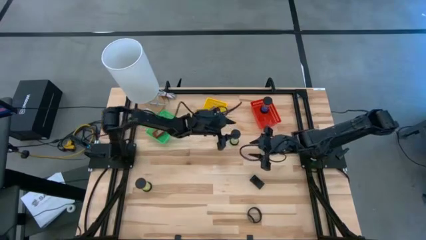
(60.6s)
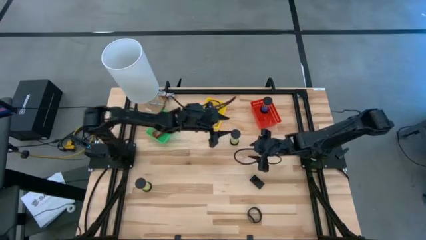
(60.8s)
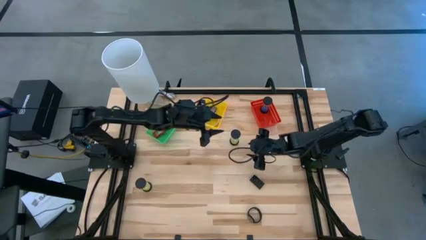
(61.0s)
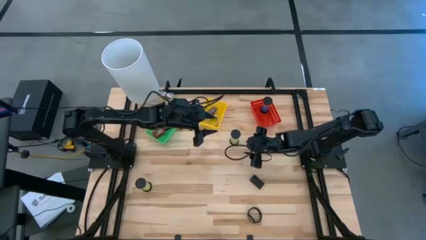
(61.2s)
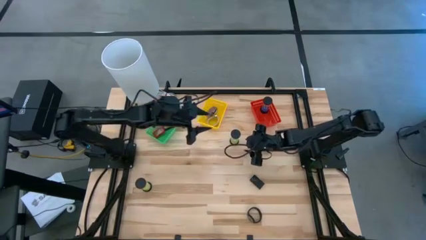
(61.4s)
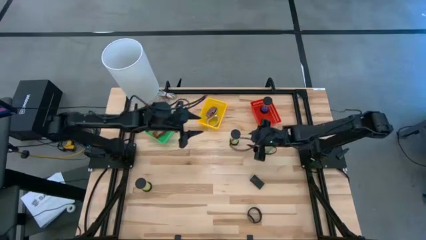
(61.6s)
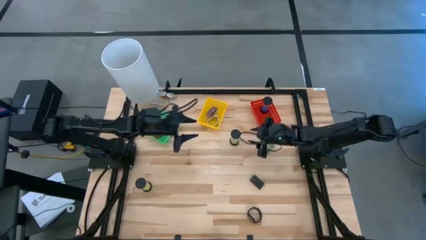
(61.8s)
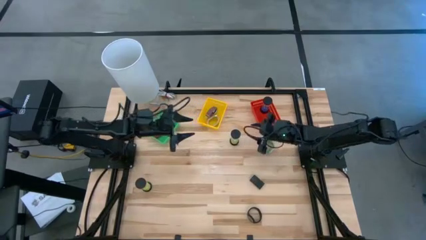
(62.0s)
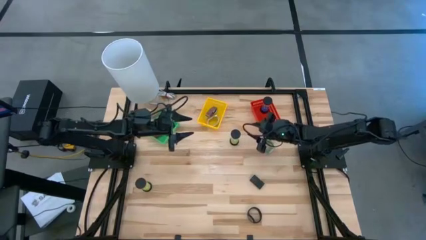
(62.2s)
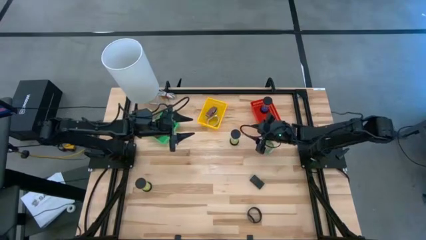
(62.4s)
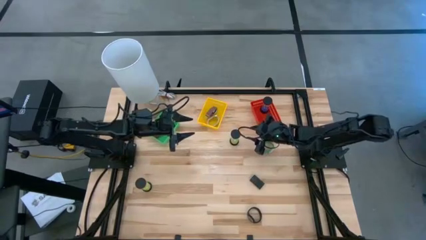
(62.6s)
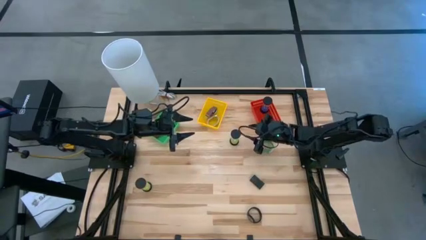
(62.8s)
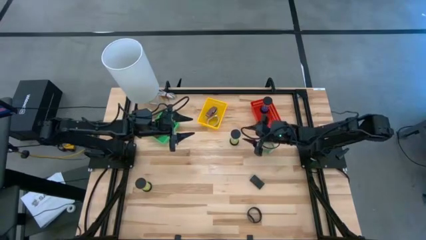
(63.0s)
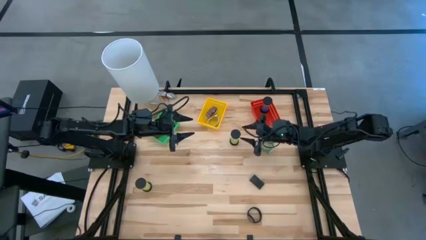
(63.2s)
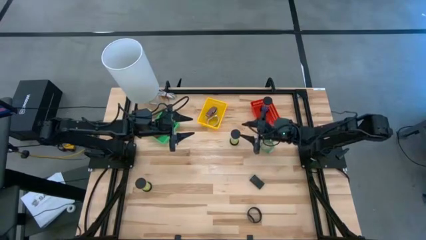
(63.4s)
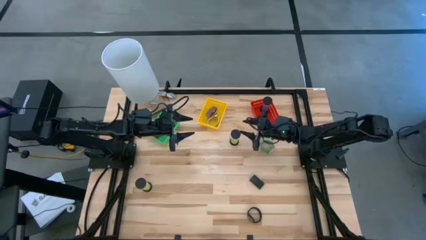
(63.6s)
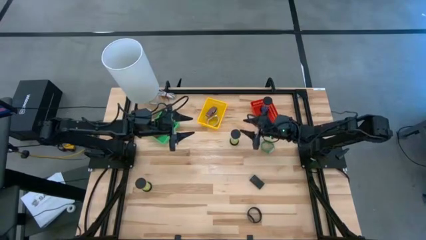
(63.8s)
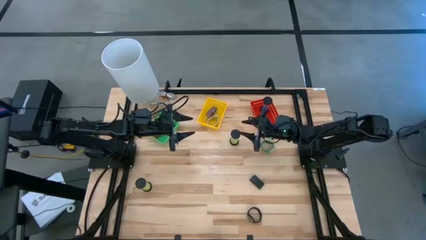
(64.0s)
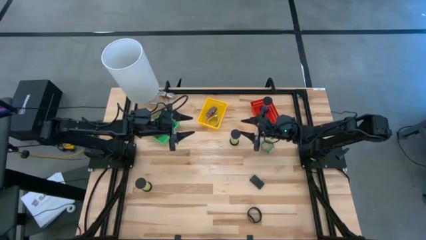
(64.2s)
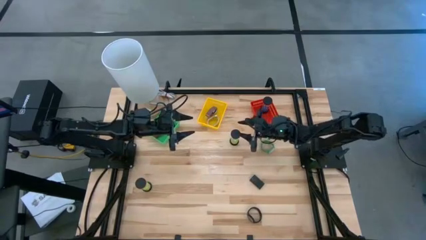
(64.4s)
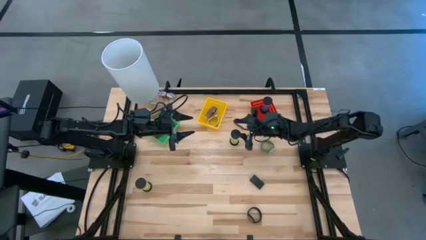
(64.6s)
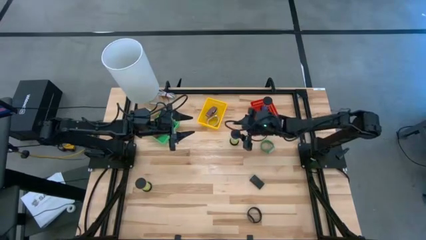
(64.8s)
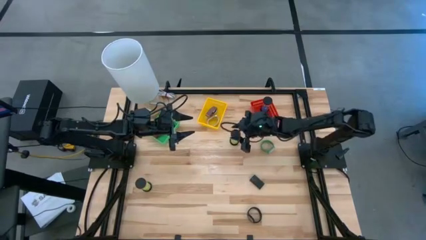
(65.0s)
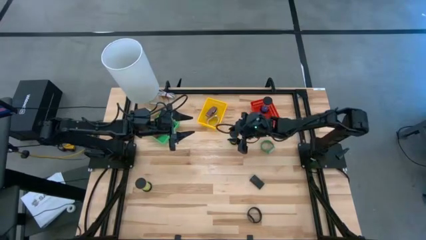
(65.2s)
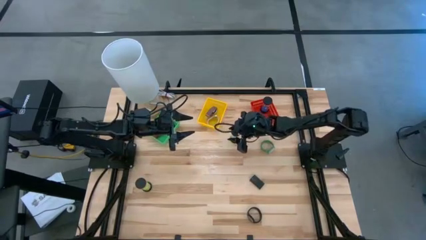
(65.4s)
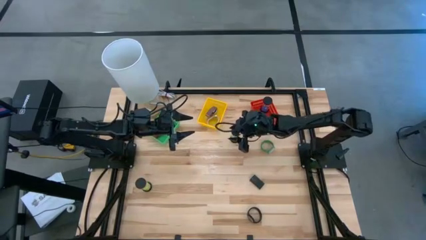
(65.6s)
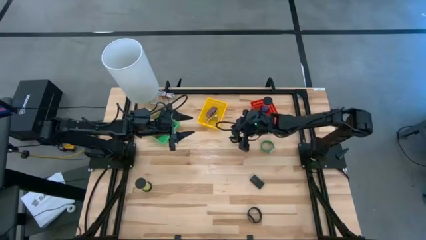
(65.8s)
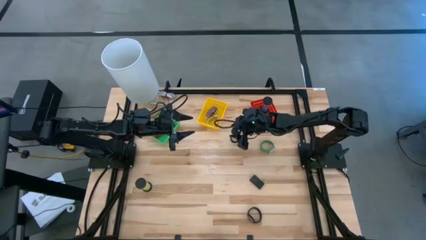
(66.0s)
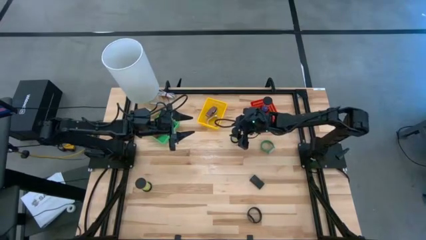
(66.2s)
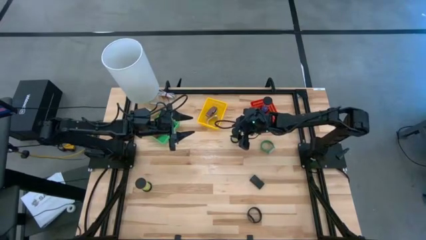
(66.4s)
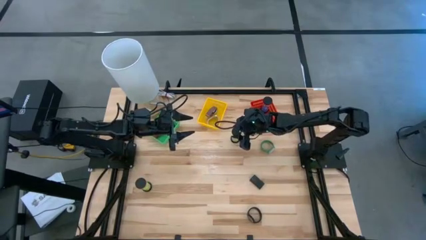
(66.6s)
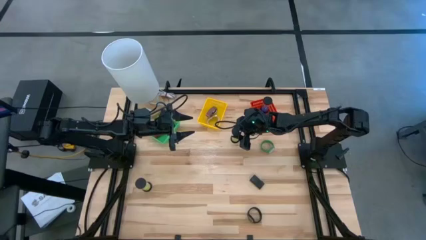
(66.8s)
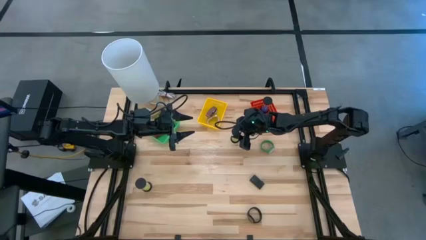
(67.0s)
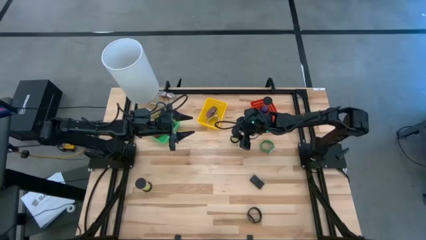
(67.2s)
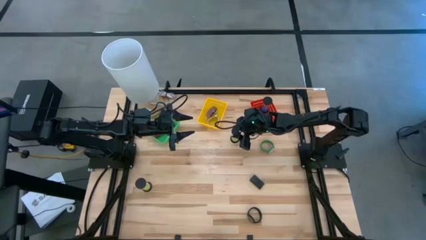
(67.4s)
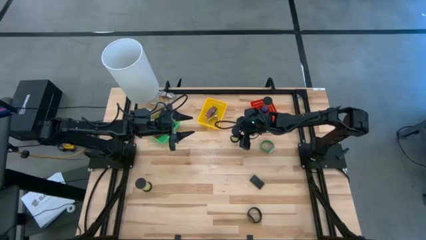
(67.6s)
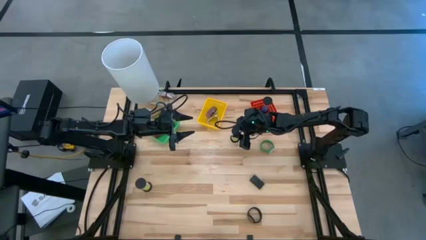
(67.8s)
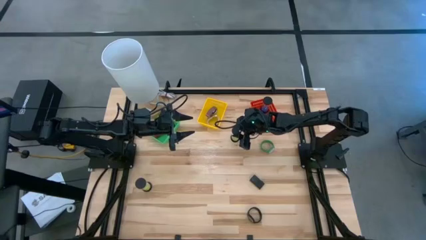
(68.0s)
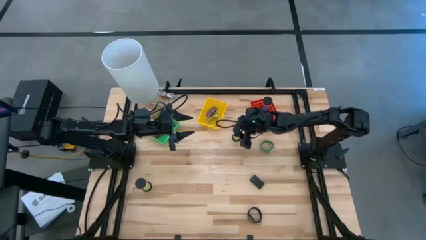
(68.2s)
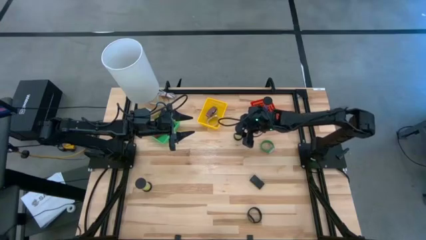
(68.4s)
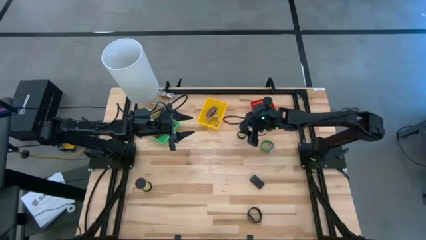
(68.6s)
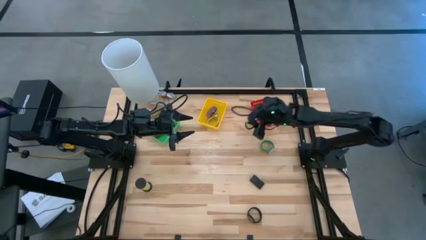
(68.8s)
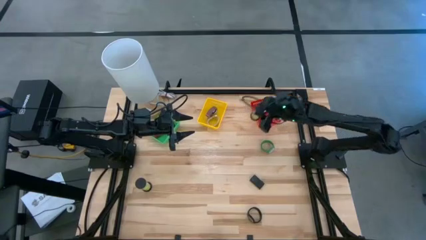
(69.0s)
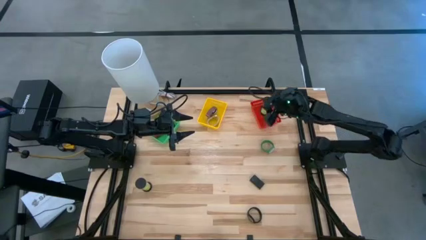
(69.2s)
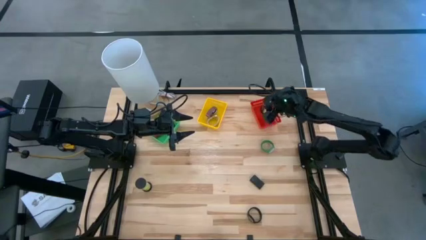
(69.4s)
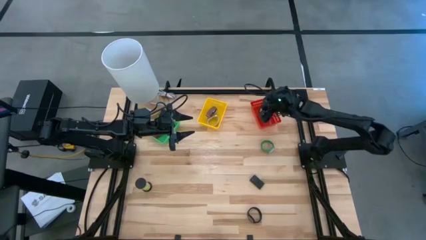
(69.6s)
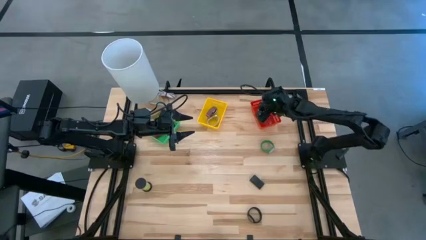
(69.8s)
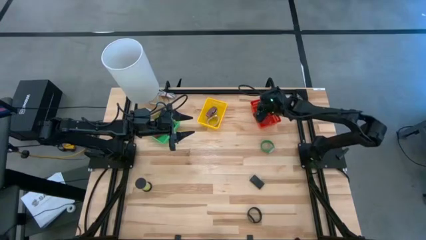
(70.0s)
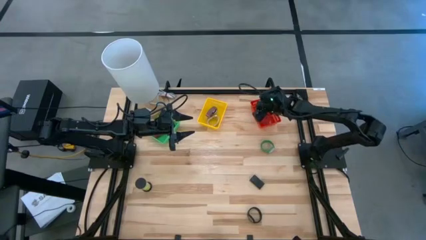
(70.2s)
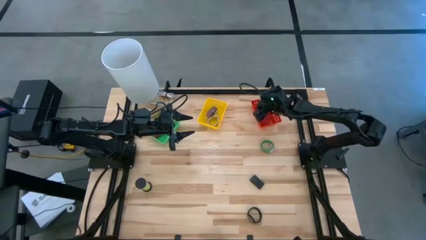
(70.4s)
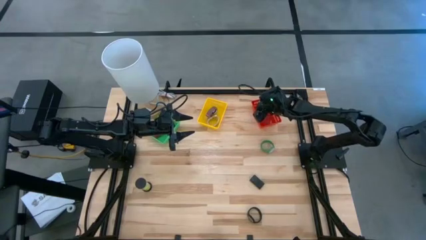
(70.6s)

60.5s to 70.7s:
Task: Pick & Place Office items
Put the right yellow hourglass into the red bin

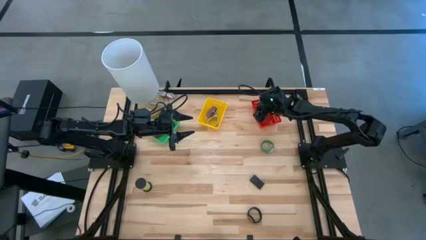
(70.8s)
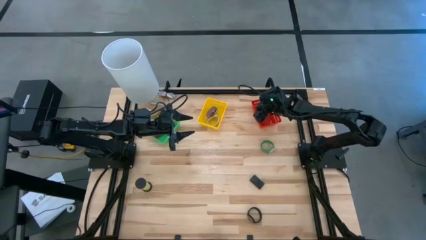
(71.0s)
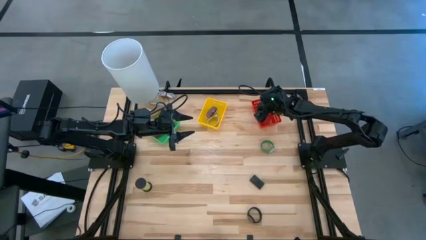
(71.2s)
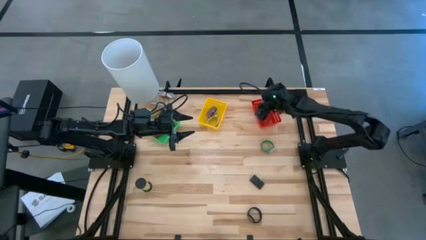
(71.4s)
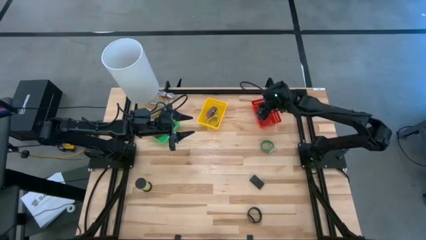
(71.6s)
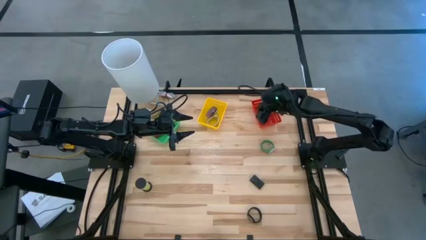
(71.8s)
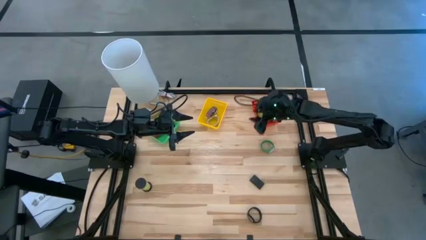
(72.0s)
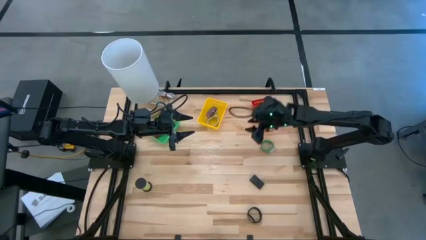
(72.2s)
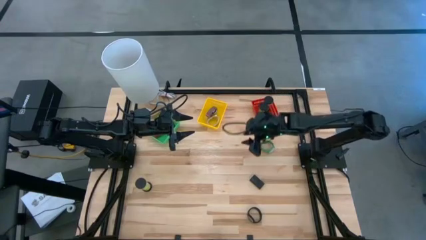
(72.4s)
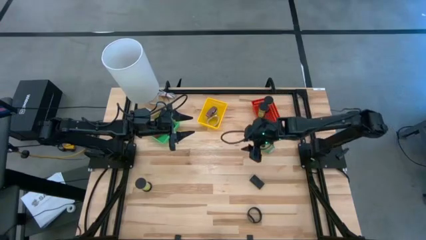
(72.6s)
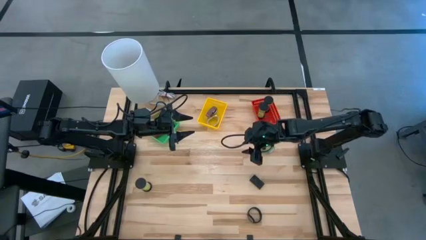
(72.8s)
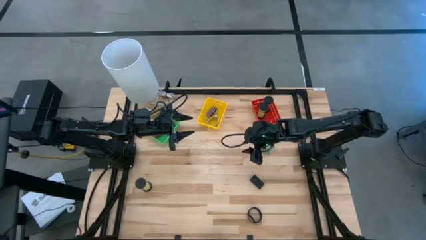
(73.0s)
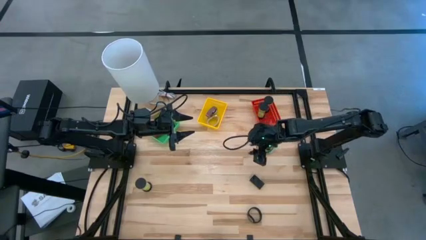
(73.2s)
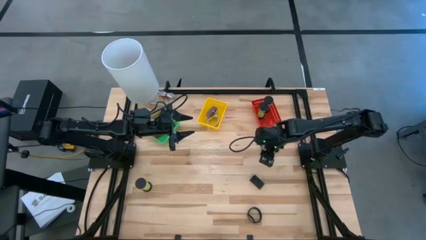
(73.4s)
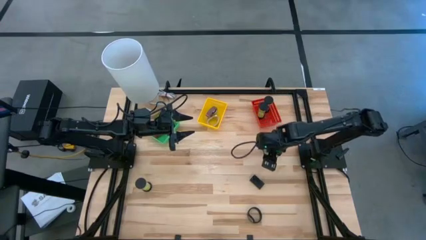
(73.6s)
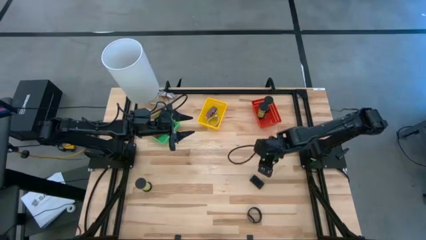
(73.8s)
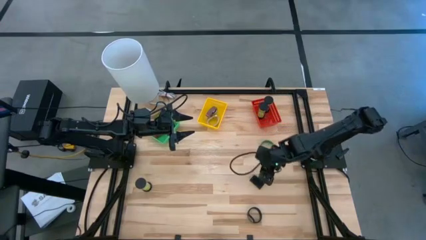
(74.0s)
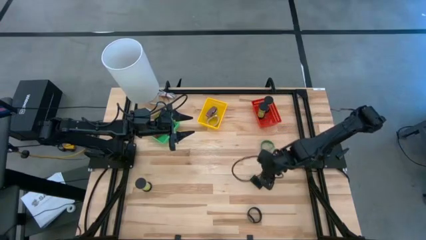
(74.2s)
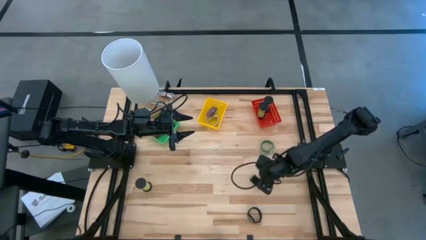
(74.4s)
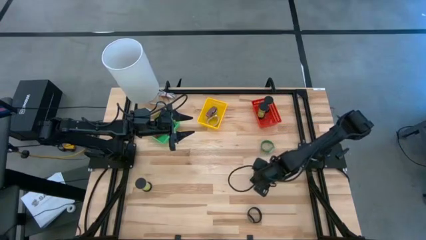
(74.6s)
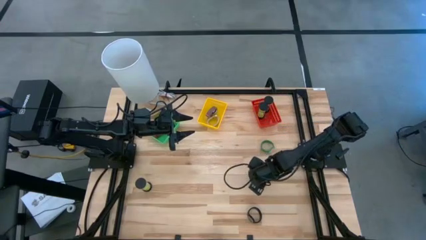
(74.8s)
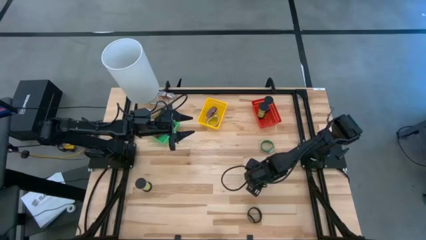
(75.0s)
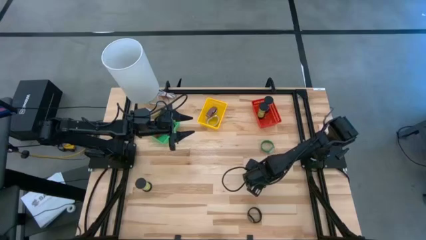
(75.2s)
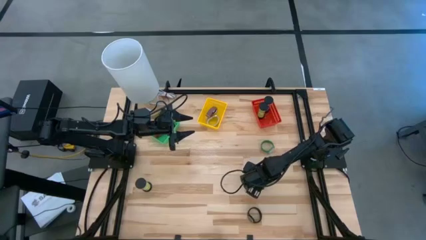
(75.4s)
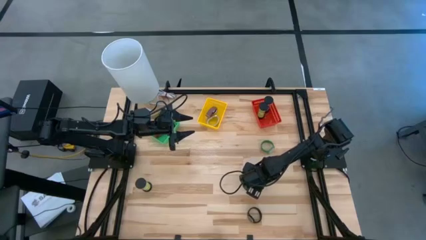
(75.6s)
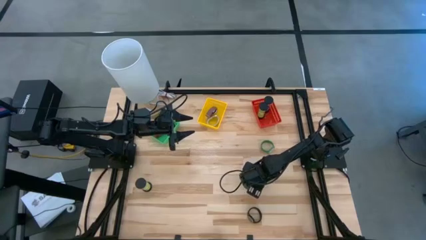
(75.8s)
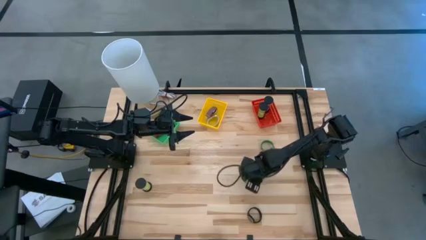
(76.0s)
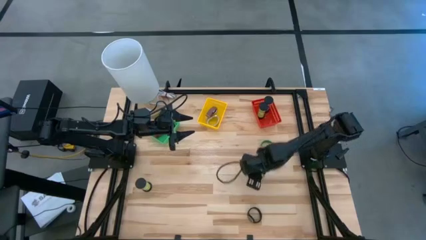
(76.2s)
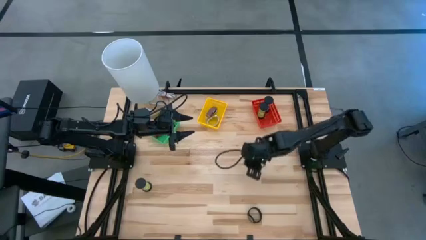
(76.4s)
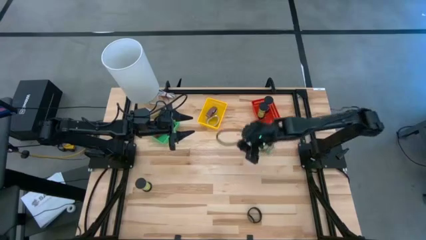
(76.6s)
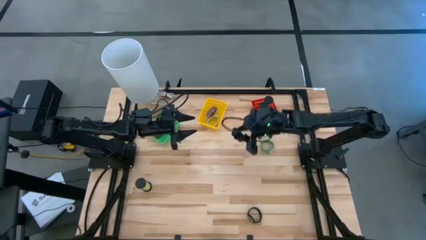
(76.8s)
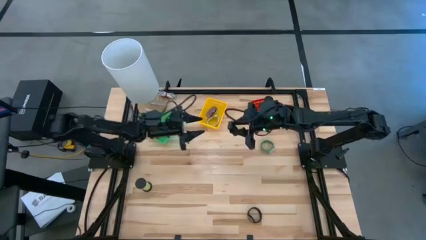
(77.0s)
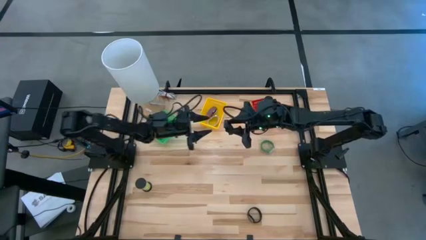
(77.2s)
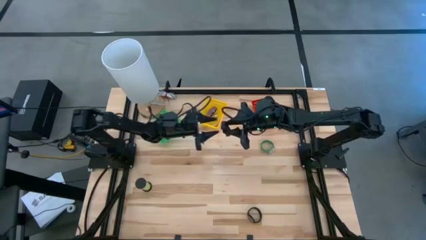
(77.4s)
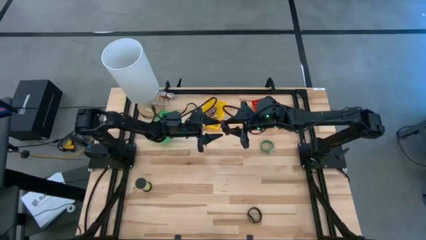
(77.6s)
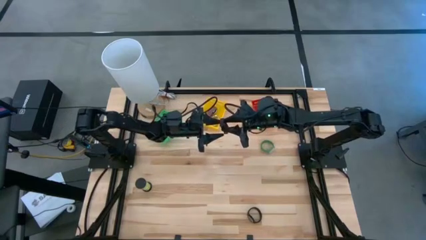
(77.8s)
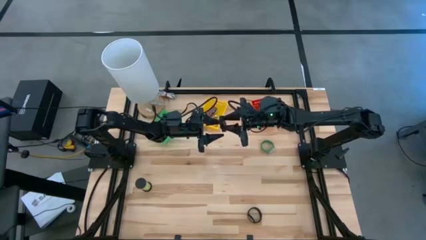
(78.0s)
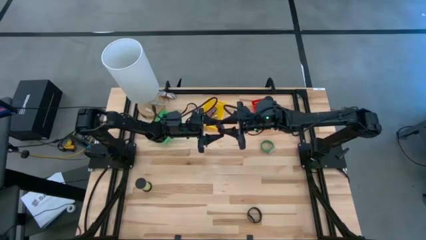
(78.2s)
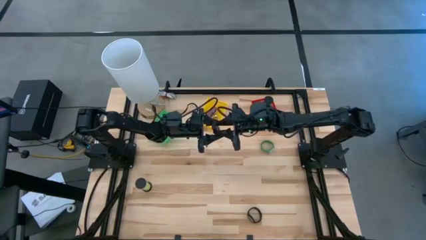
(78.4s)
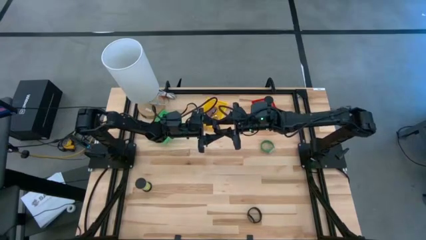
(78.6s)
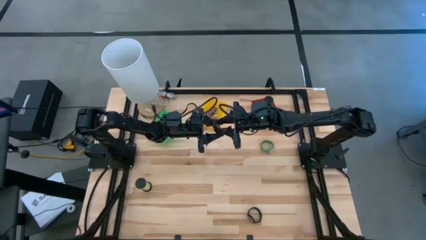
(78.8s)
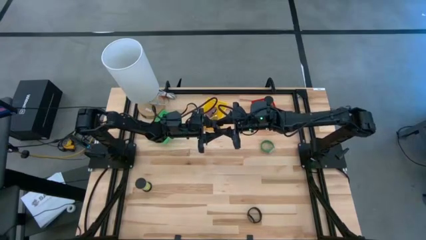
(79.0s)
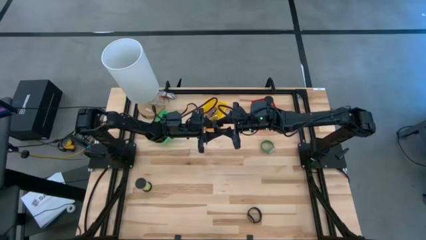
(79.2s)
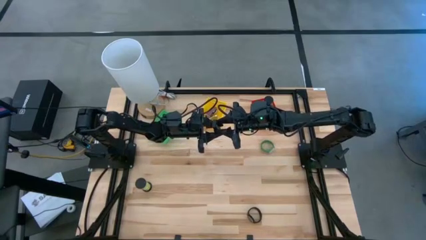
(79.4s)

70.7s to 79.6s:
Put the black timer into the green bin
